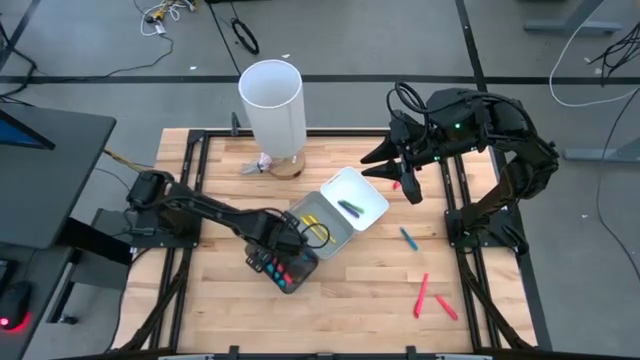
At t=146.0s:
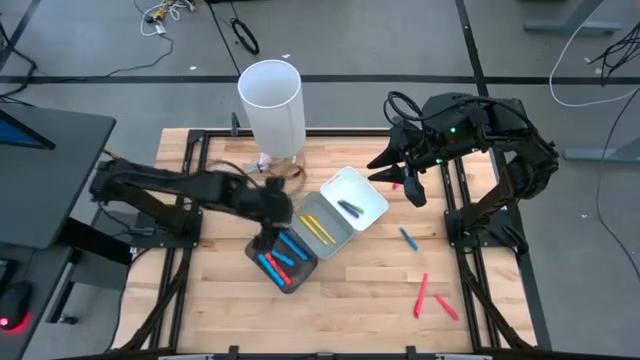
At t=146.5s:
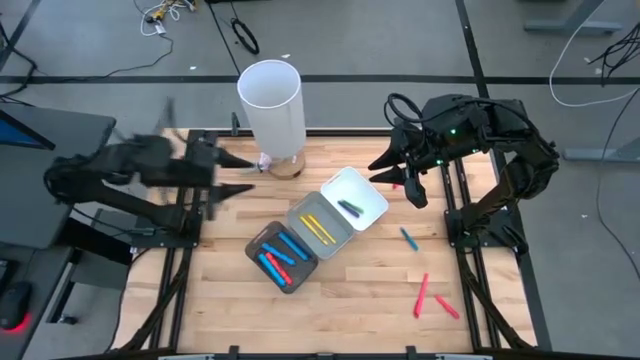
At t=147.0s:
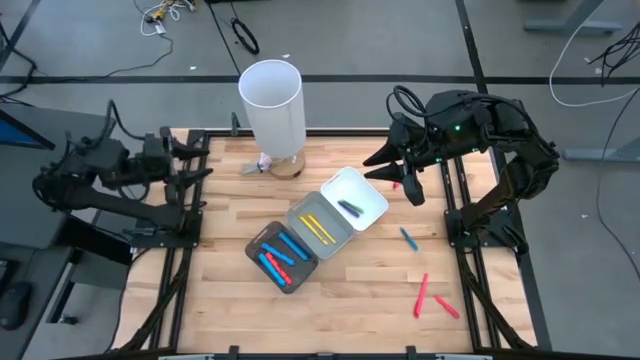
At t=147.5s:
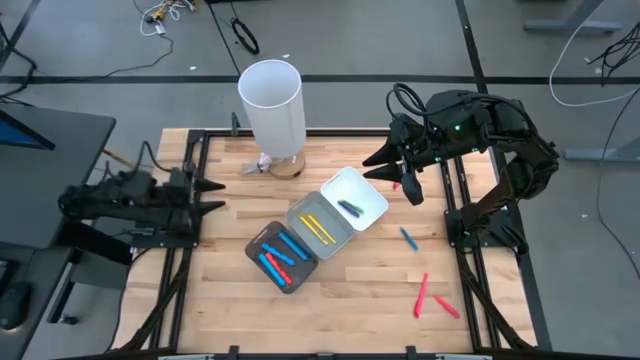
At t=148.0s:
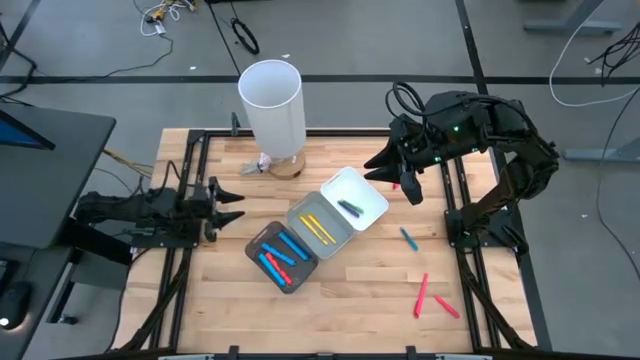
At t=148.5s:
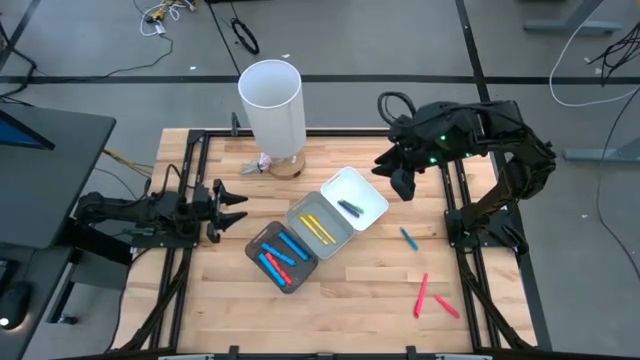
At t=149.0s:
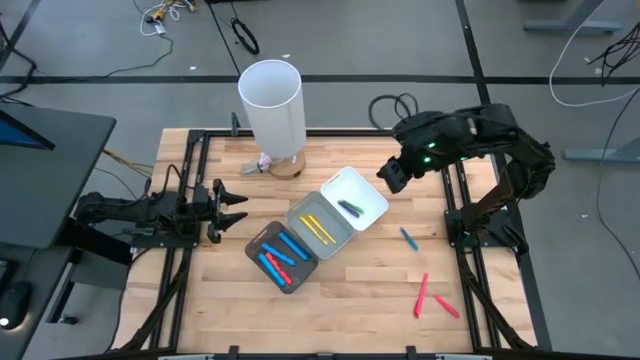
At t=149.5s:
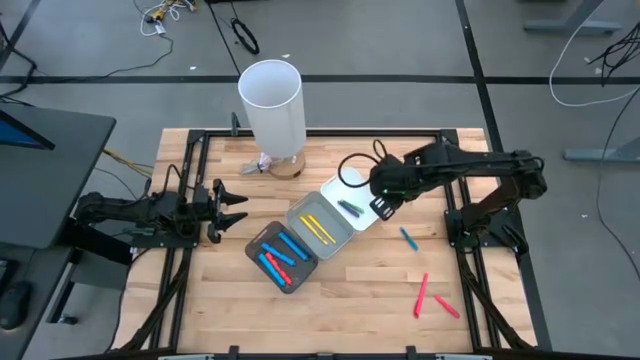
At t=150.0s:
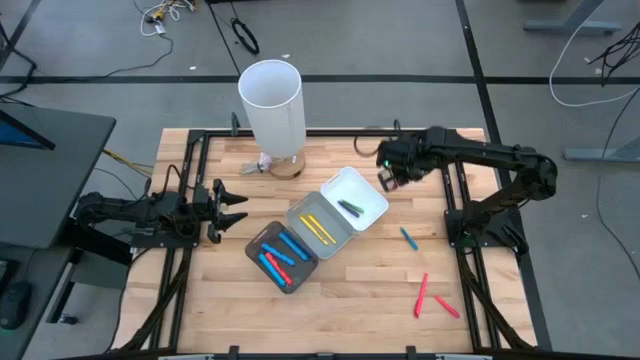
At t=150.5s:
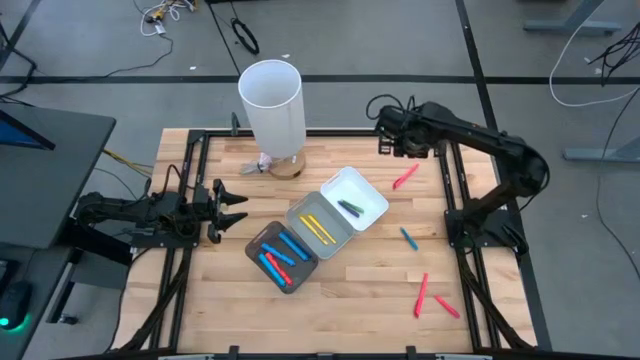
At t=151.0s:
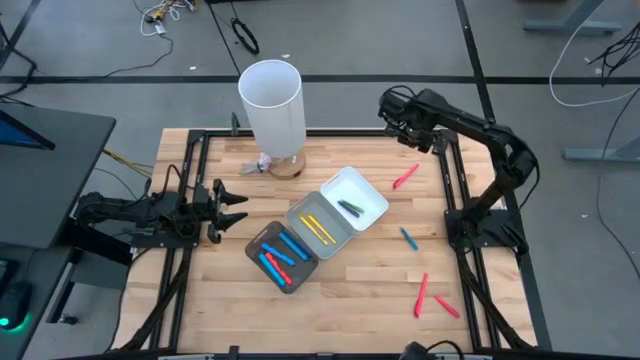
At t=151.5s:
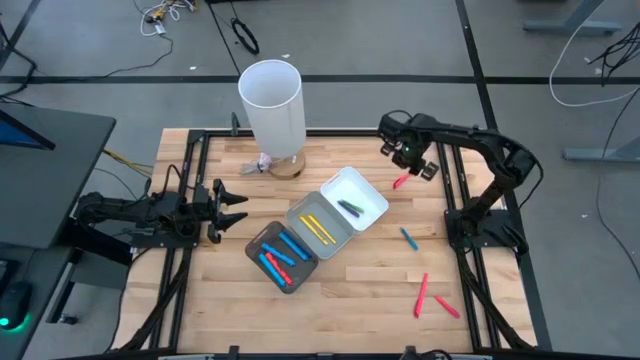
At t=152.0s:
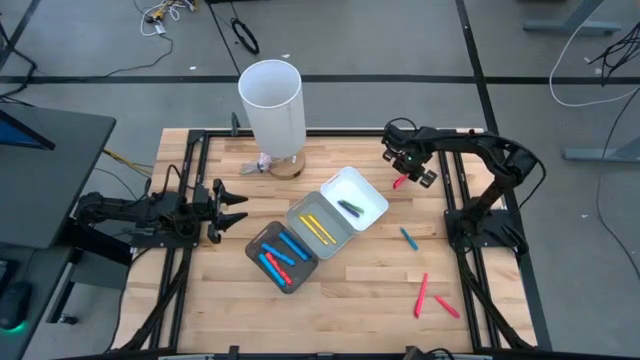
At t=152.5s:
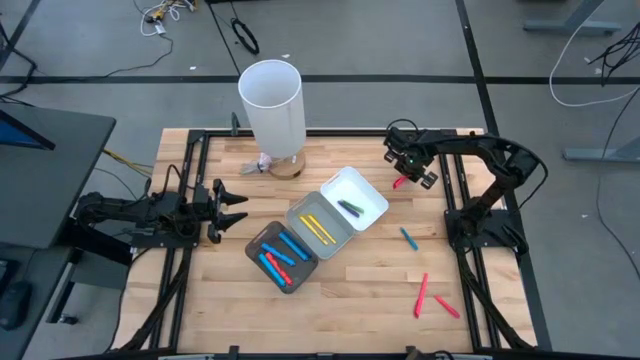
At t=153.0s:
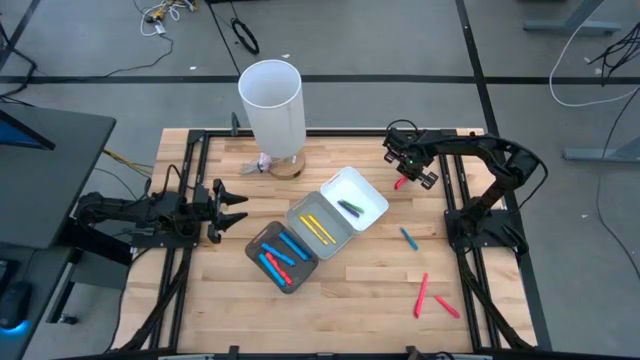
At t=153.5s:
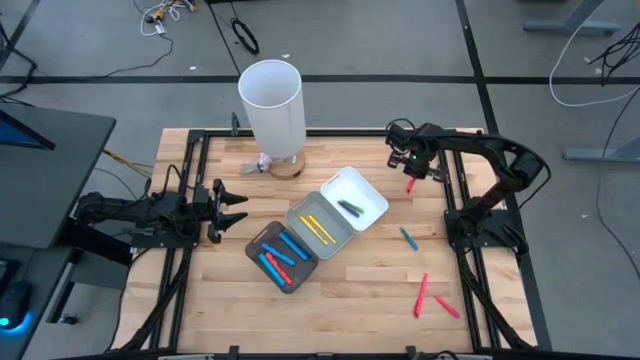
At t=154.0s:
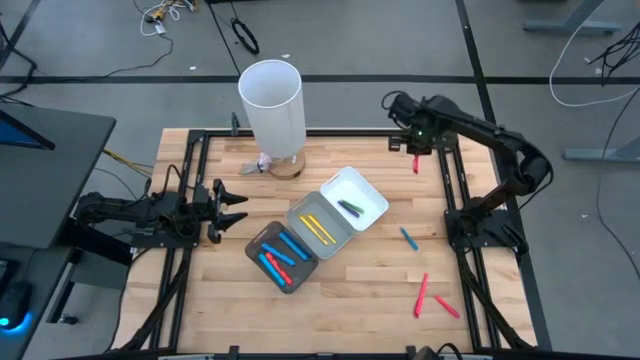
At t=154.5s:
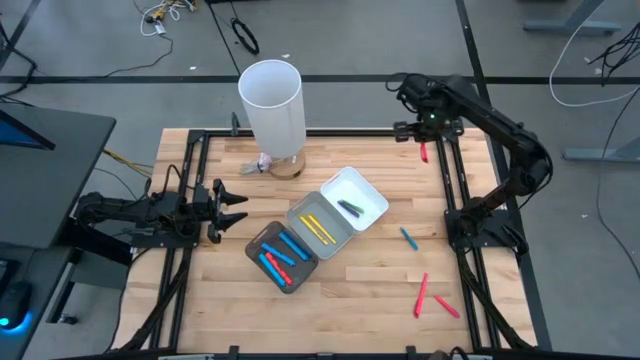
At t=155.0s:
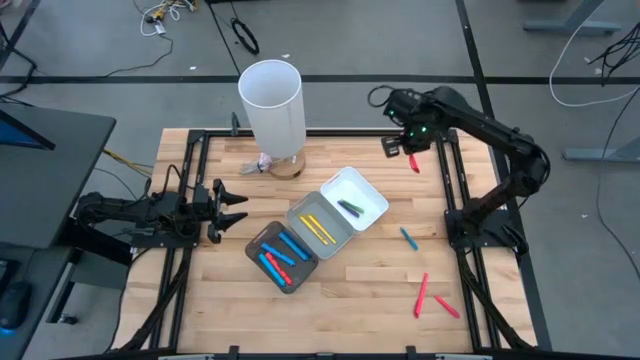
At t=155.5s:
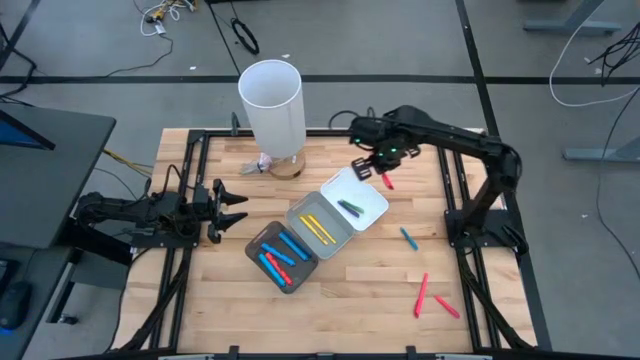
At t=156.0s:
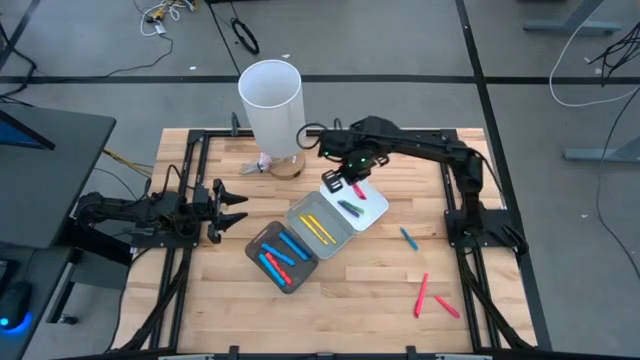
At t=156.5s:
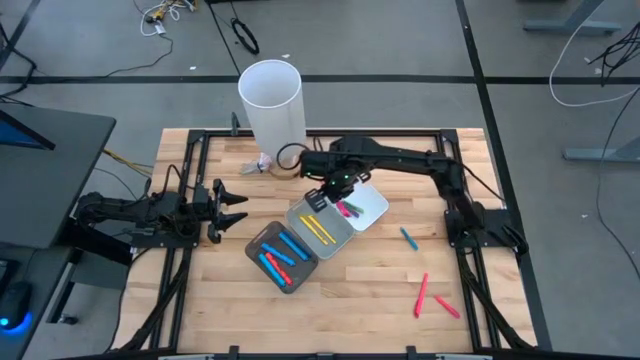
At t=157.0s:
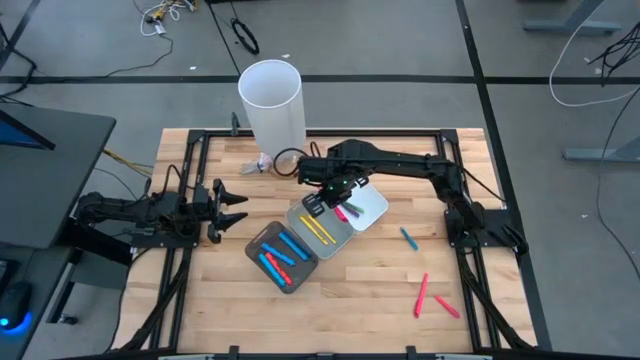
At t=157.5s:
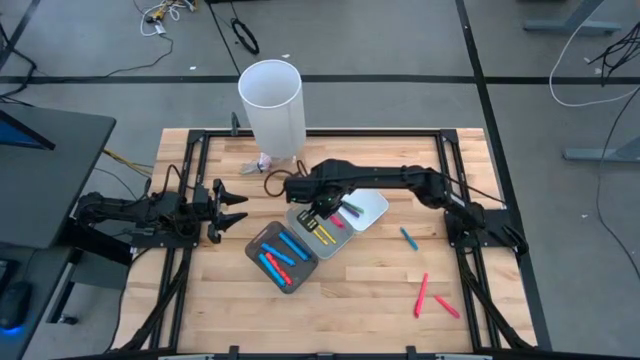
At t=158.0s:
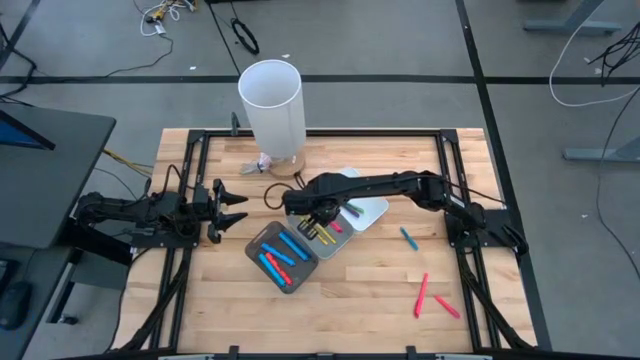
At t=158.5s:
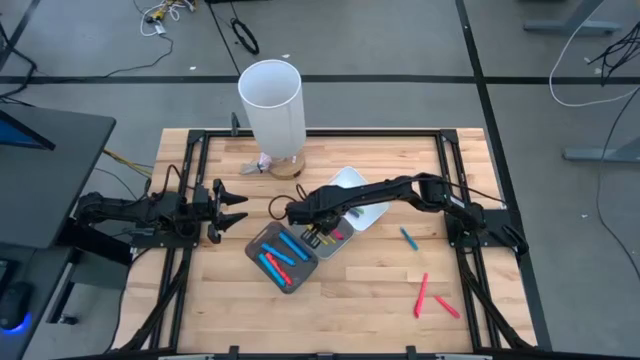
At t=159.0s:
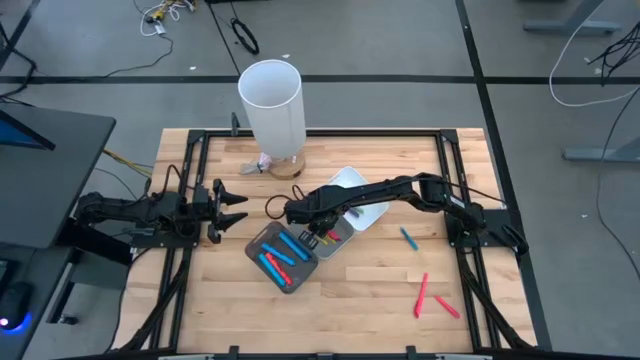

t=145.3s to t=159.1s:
Task: Pick & Place Markers
Put the top pink marker into the gray bin

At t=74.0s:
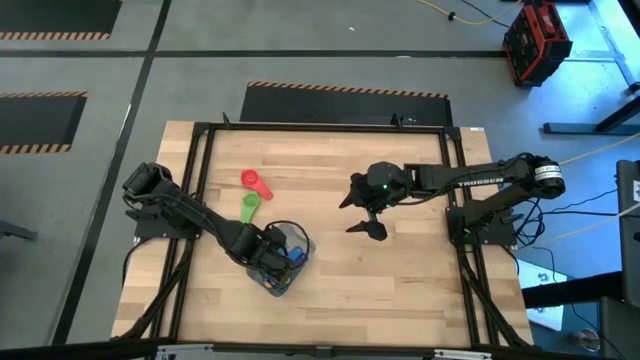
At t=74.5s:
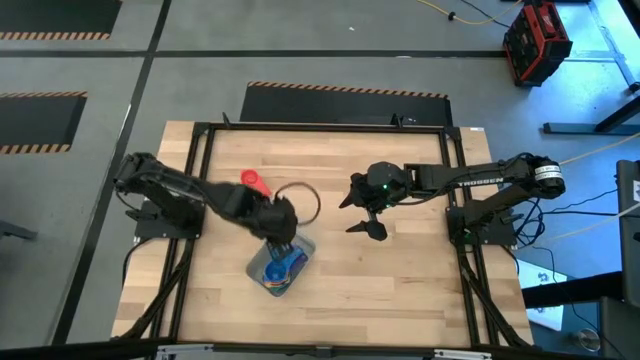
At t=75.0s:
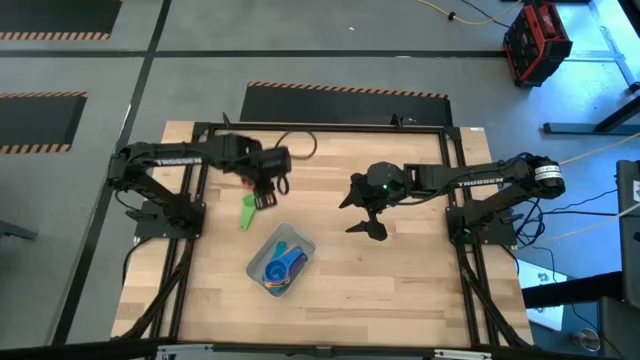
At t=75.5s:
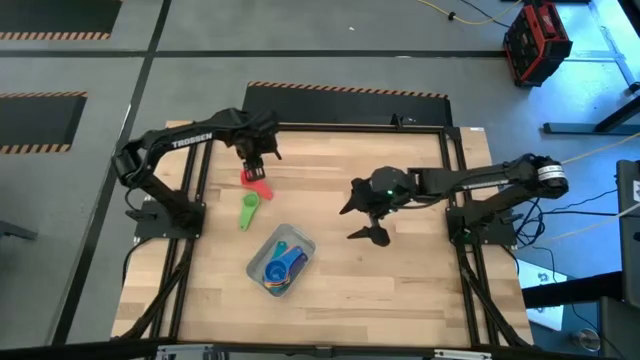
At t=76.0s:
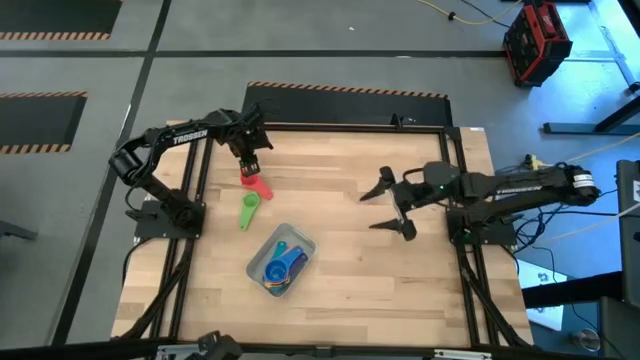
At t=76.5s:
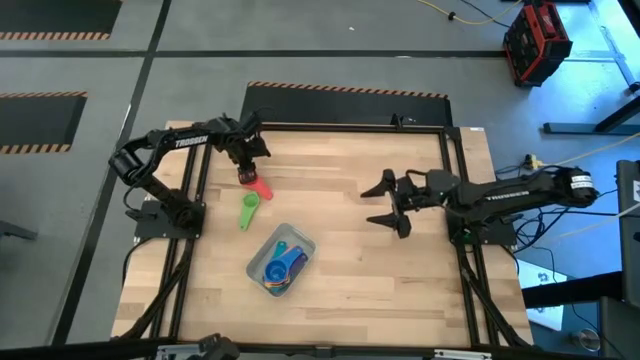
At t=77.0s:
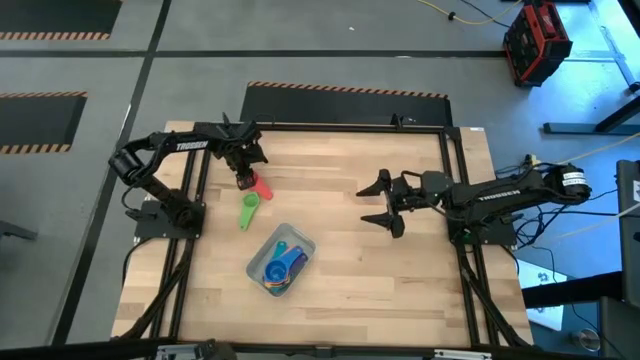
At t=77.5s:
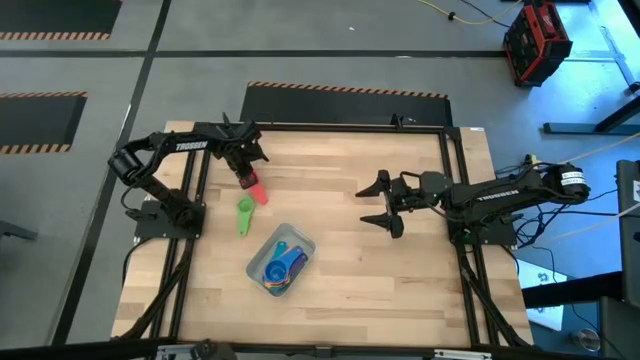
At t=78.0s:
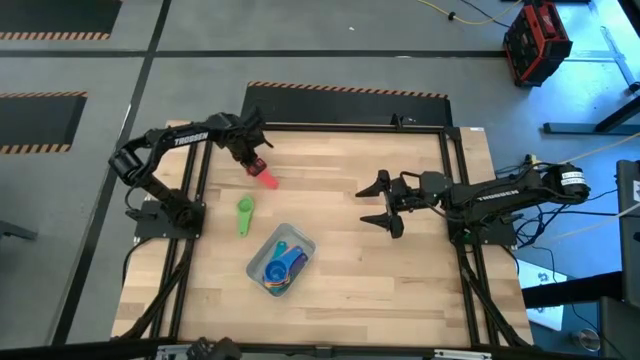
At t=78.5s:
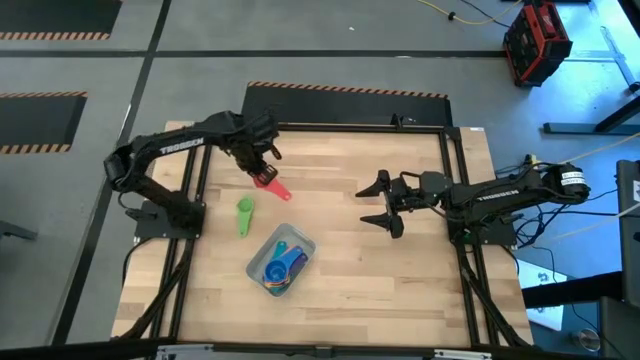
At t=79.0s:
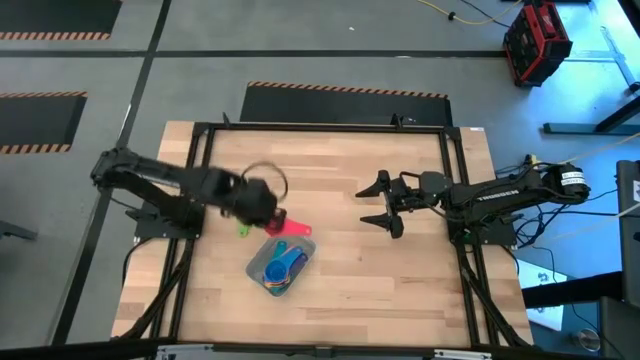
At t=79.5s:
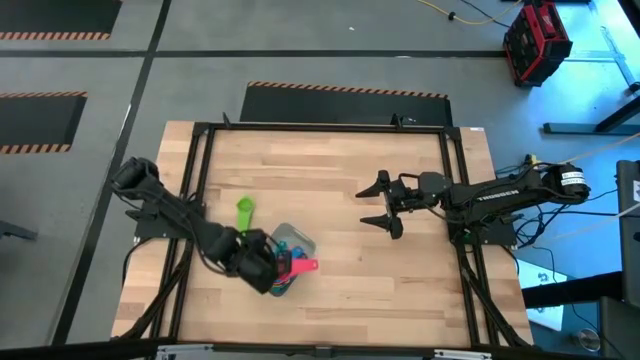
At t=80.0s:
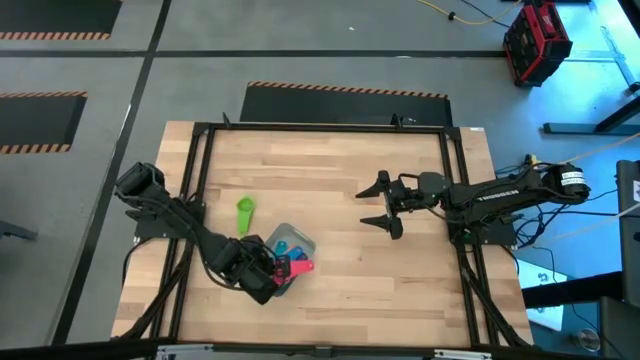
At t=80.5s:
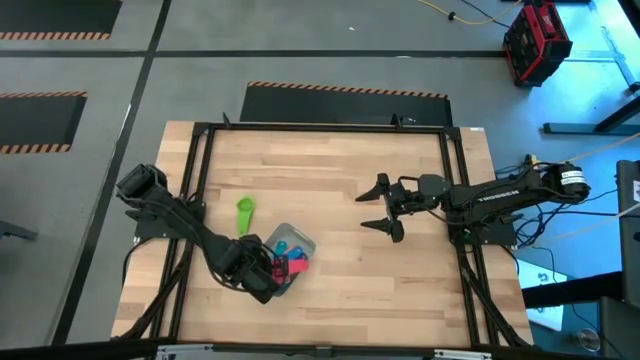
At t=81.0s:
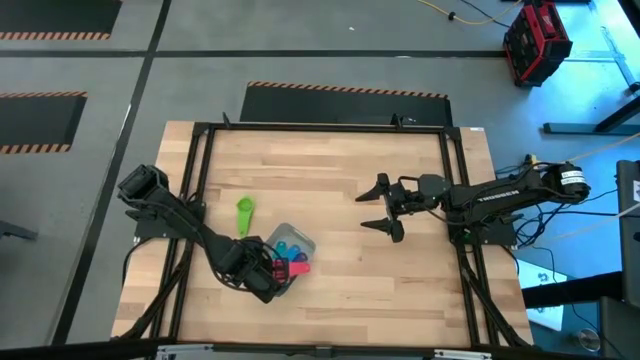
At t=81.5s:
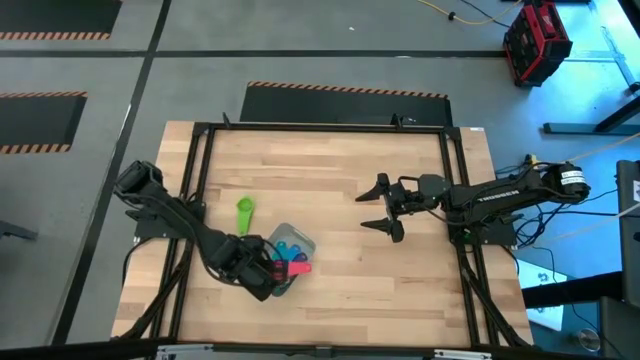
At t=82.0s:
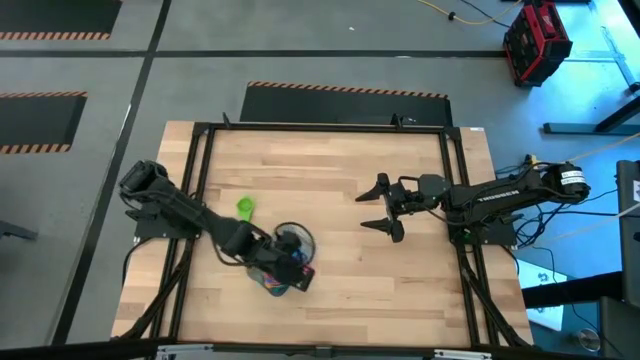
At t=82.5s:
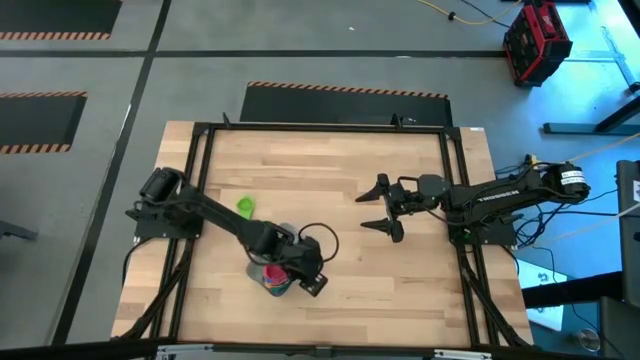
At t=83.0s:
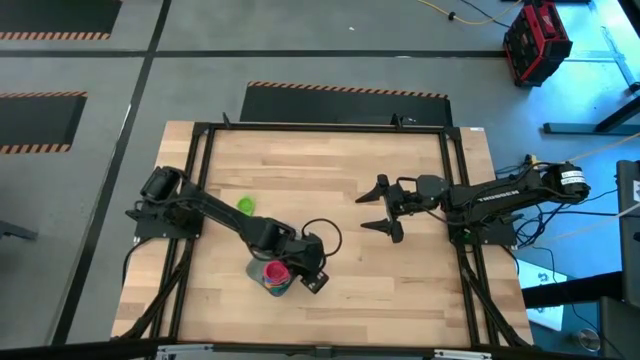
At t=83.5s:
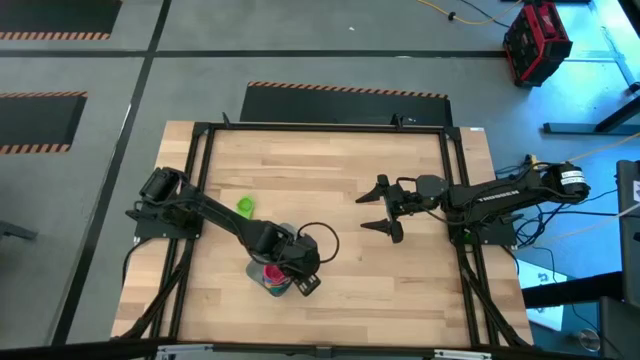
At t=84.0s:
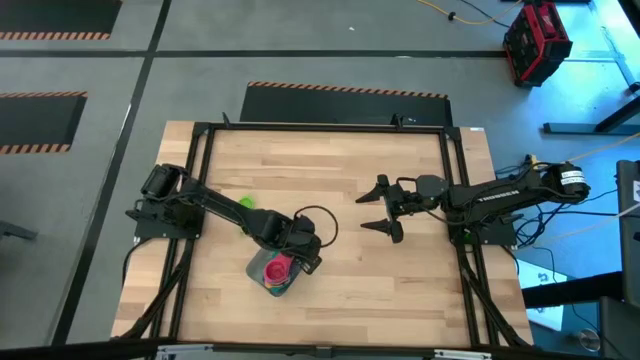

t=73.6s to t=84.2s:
Task: Nest measuring cups in basket
Stack the red measuring cup into the blue measuring cup in the grey bin
